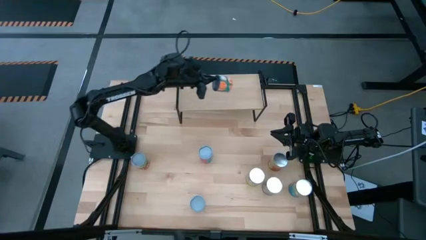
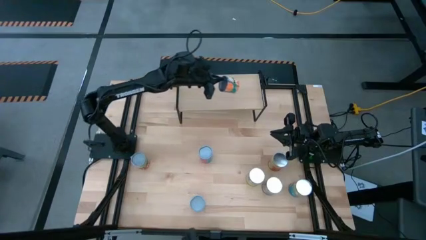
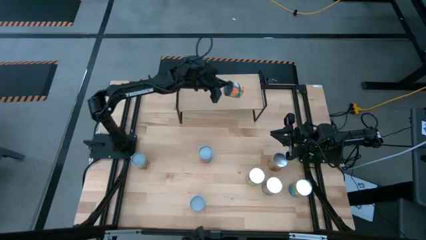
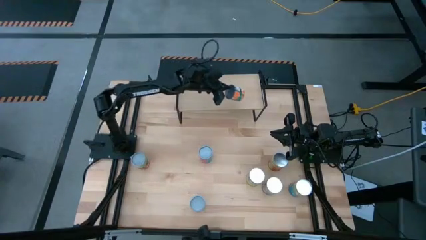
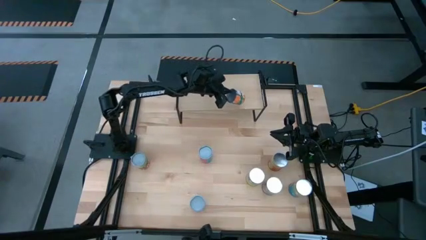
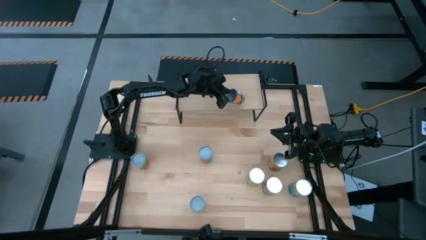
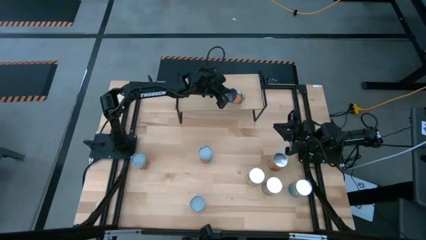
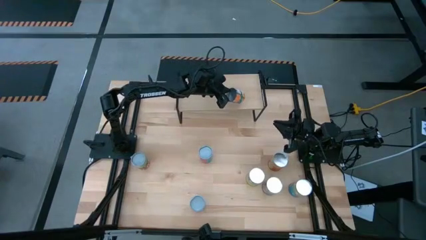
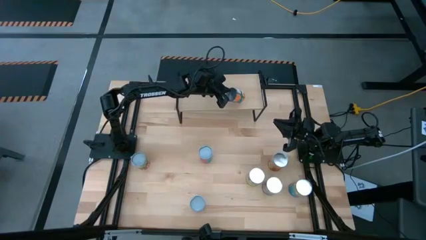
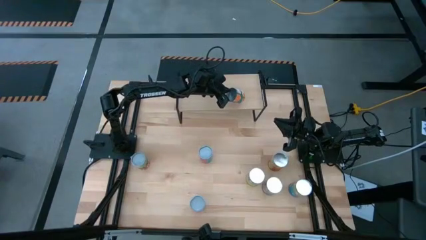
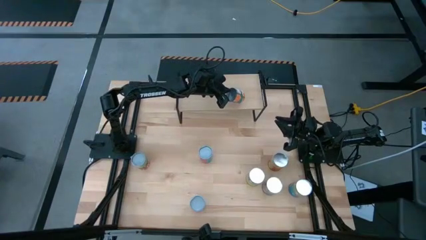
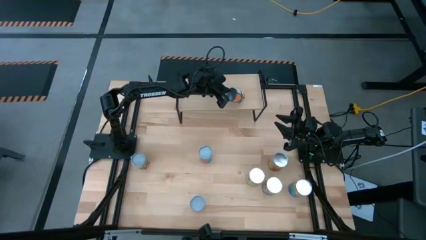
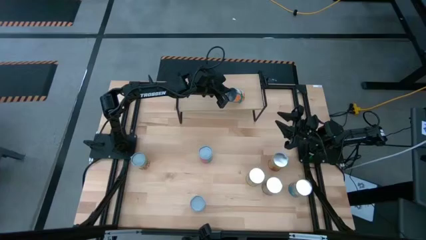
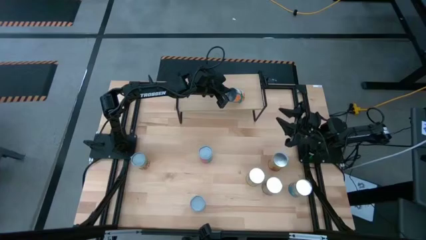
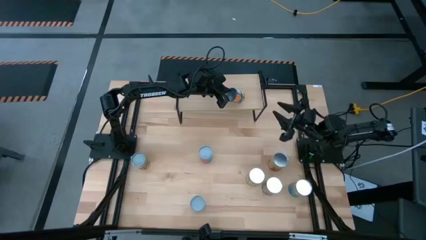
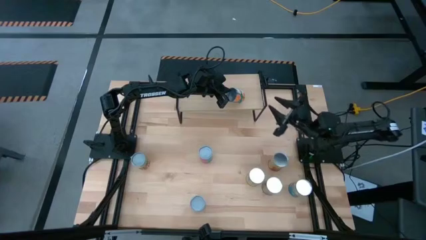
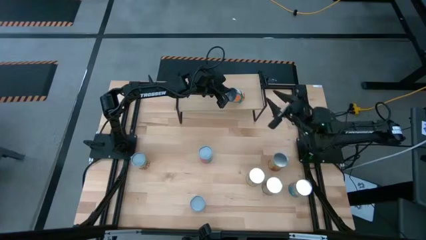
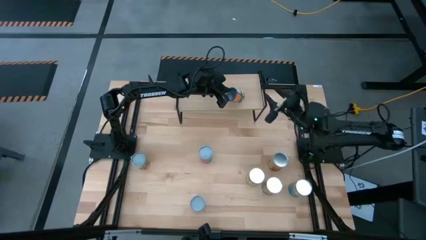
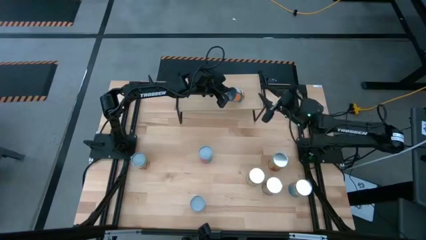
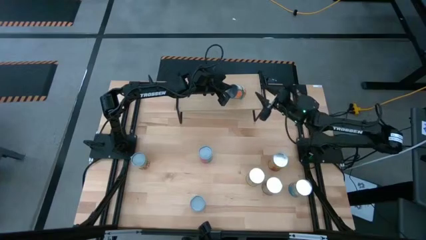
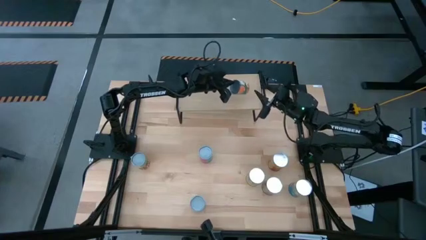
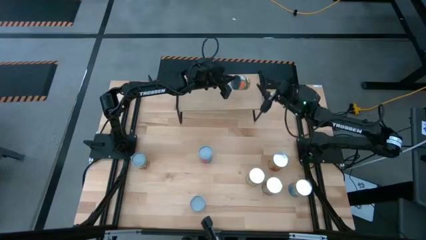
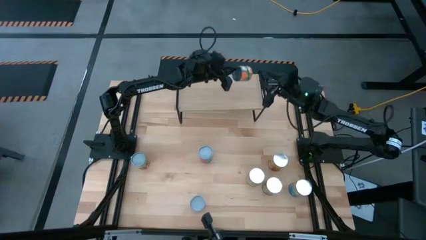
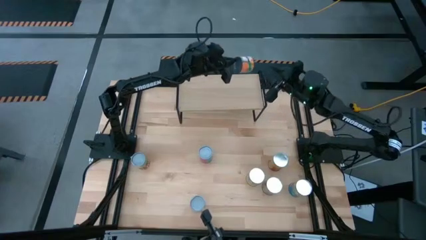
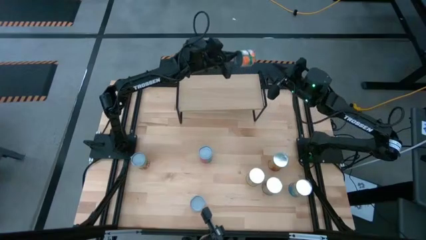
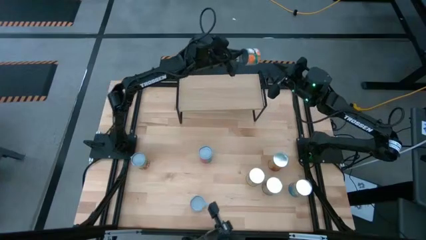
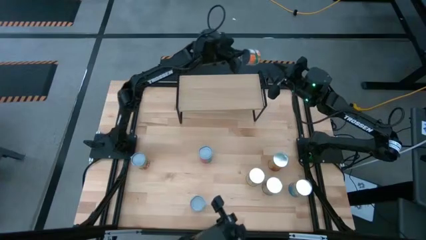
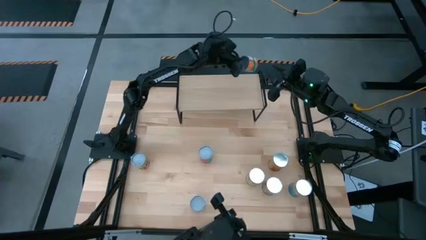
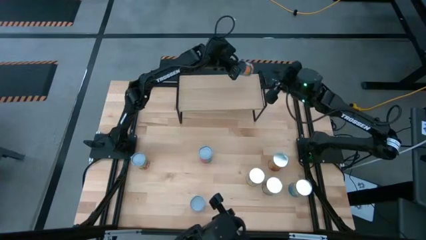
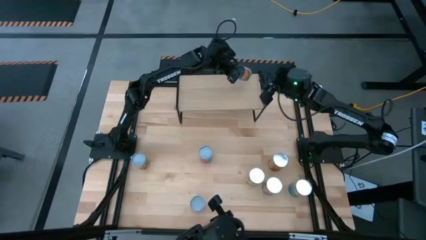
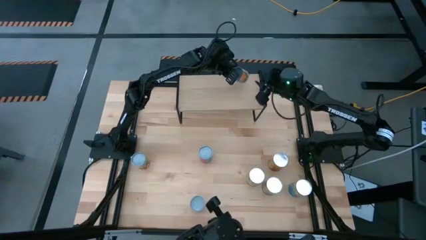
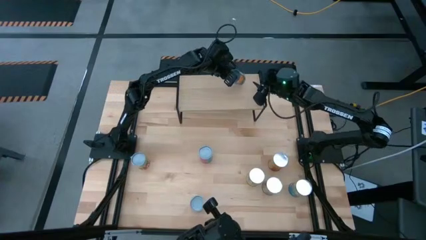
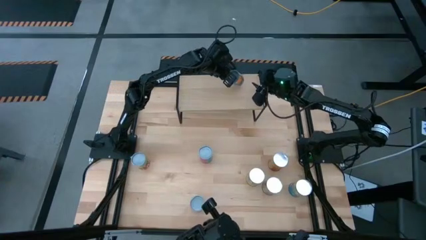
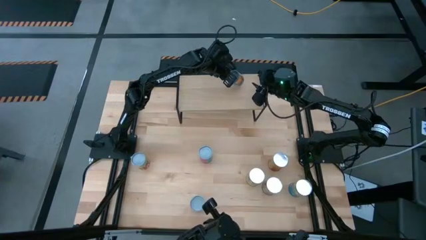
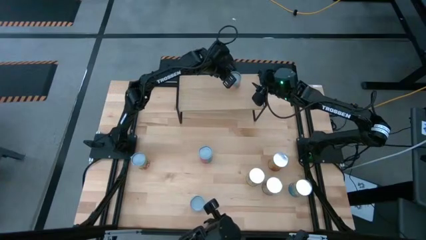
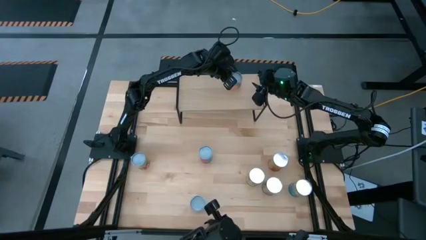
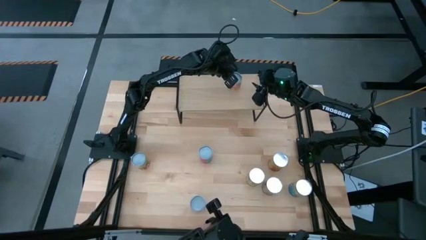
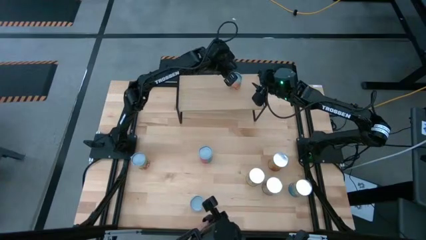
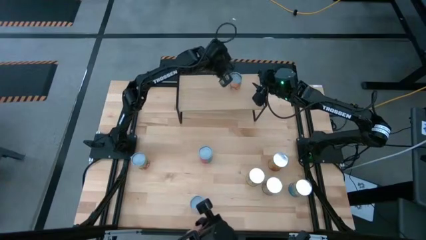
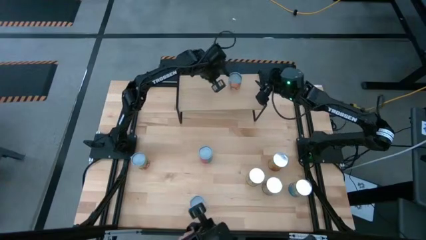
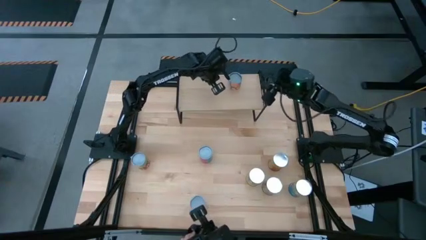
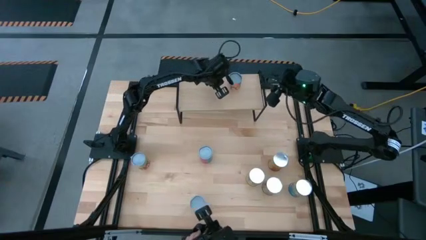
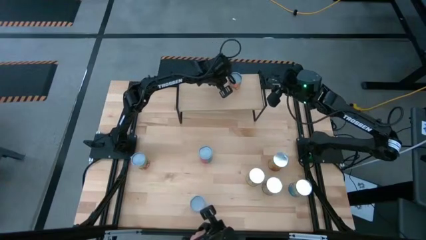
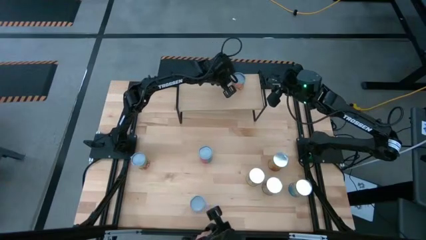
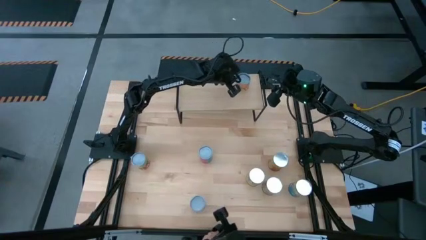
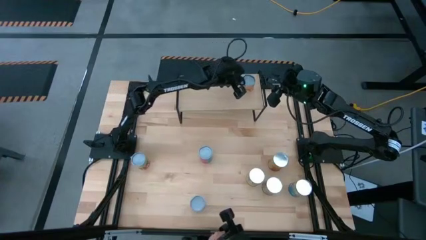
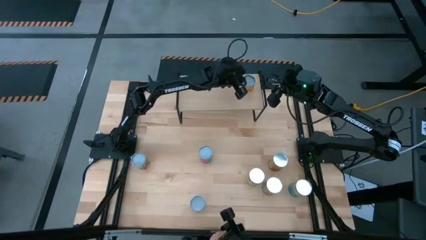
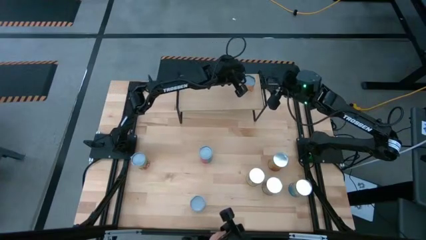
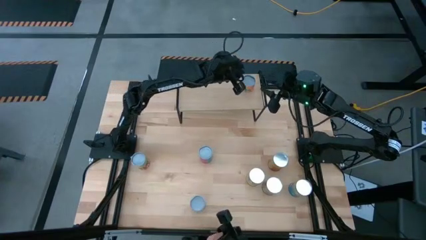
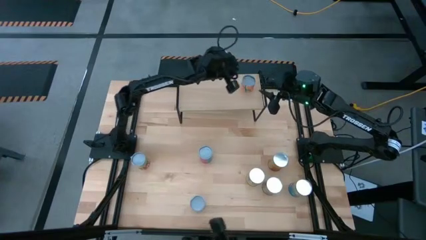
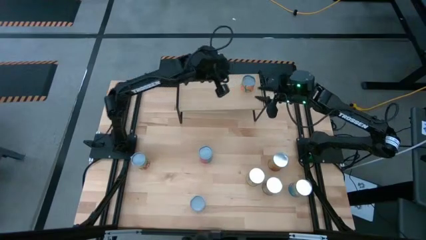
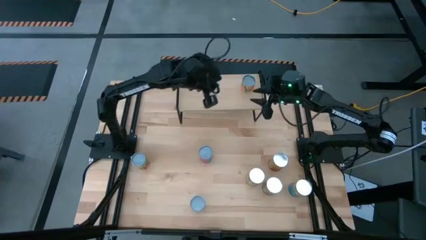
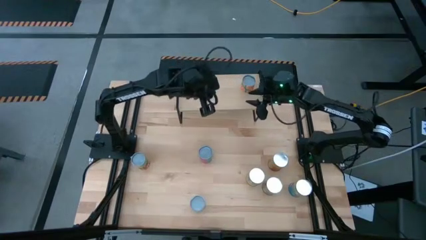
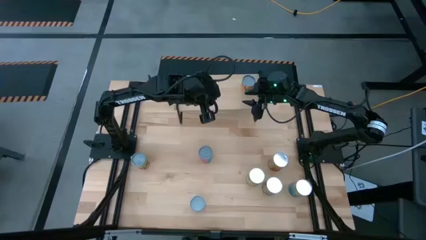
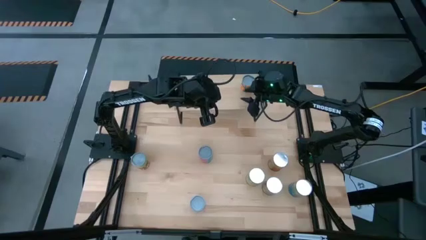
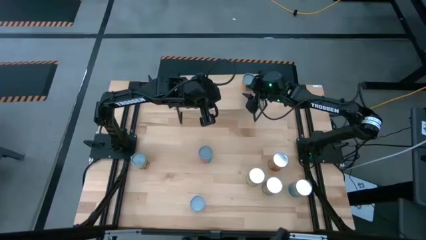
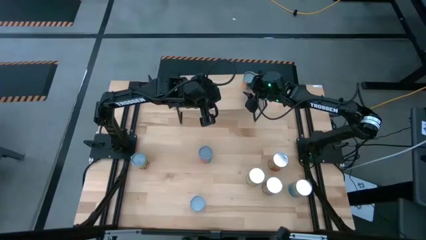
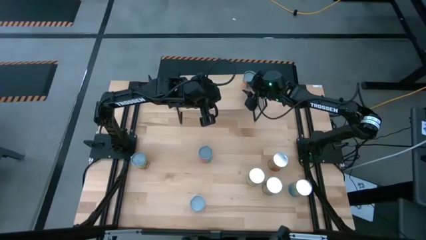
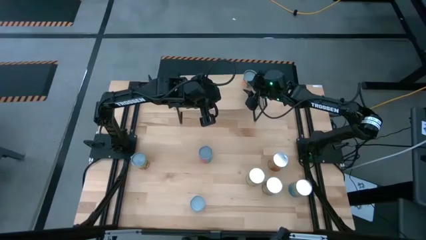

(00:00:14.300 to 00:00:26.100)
Task: Pick and place cans onto a shelf
Put the canned oranges on the shelf
